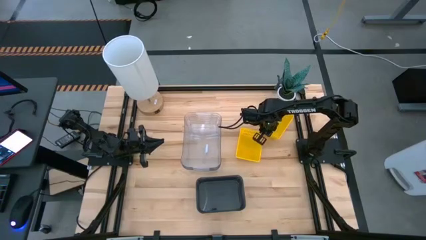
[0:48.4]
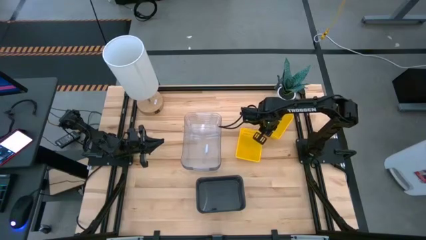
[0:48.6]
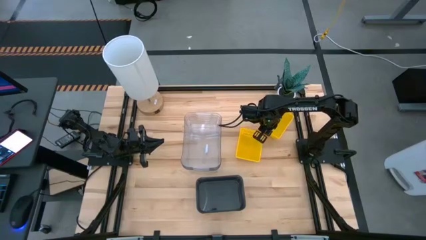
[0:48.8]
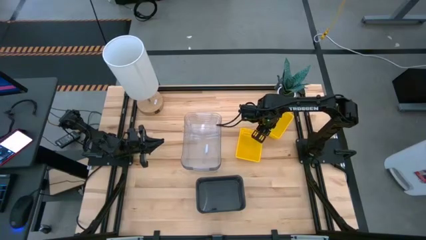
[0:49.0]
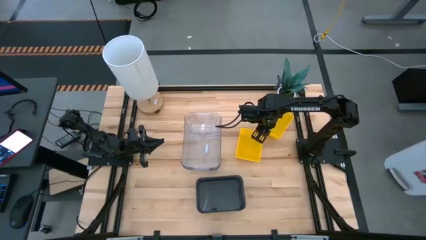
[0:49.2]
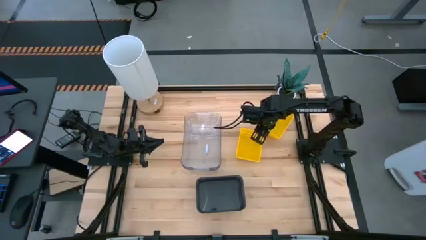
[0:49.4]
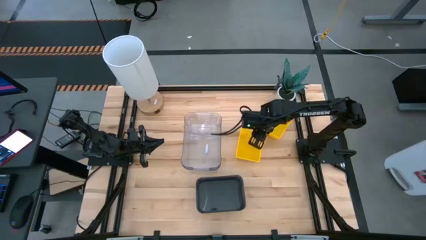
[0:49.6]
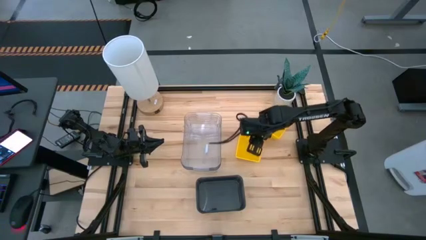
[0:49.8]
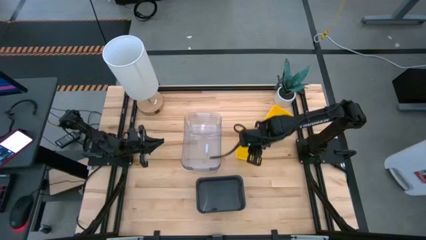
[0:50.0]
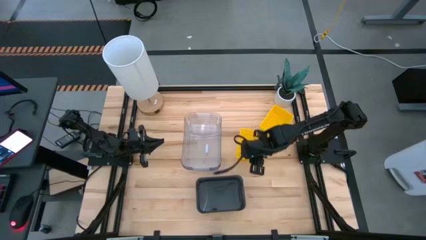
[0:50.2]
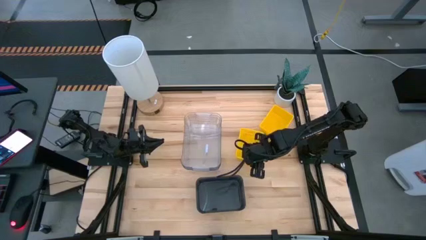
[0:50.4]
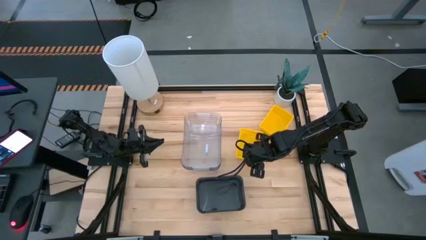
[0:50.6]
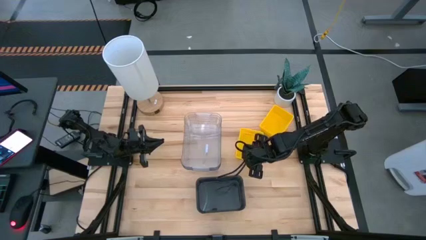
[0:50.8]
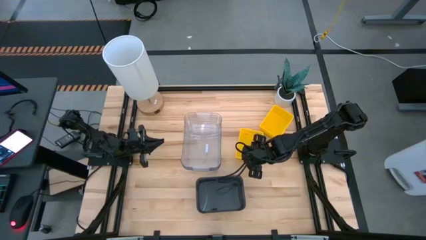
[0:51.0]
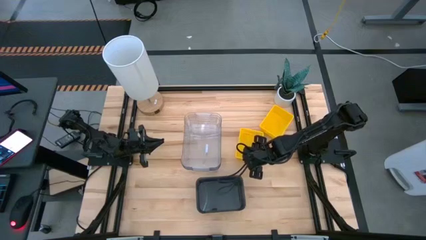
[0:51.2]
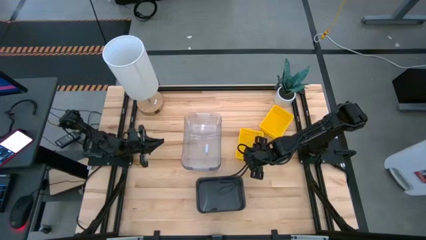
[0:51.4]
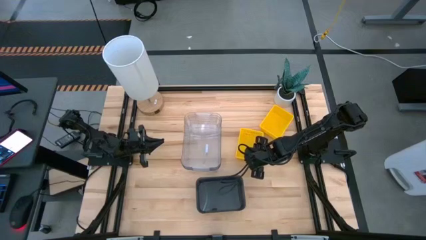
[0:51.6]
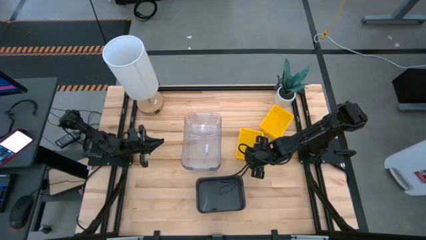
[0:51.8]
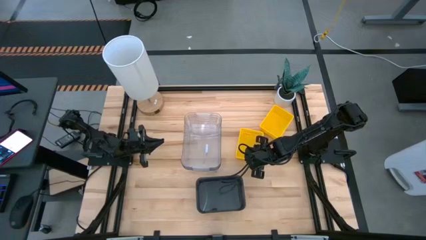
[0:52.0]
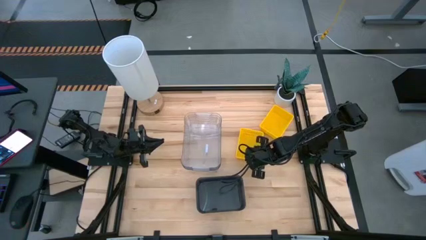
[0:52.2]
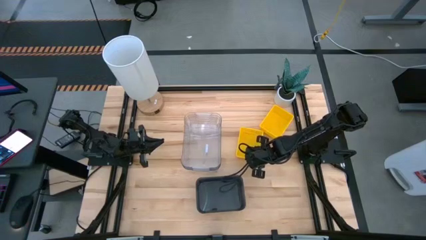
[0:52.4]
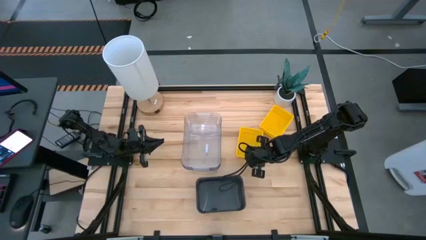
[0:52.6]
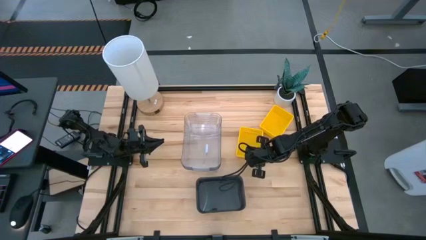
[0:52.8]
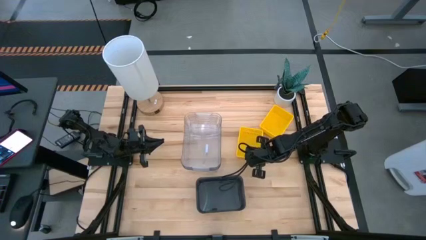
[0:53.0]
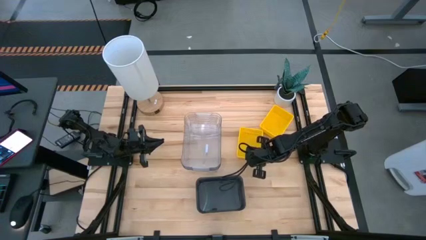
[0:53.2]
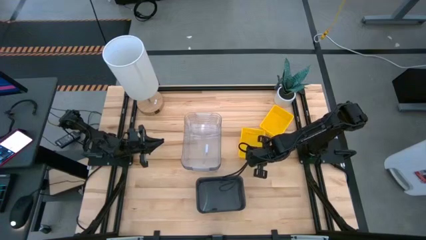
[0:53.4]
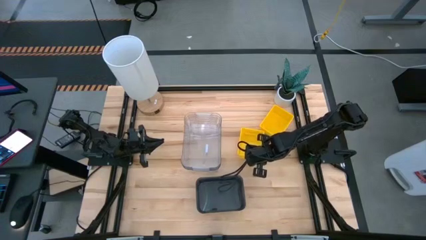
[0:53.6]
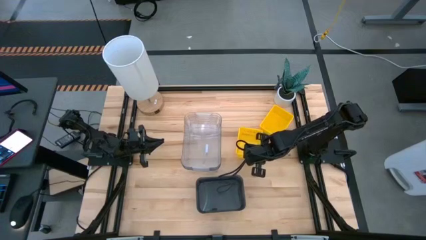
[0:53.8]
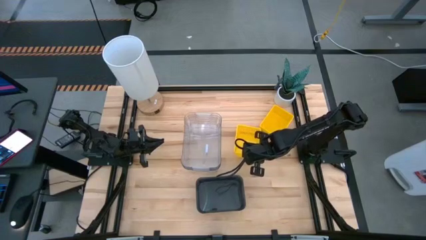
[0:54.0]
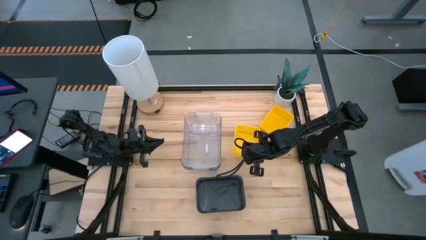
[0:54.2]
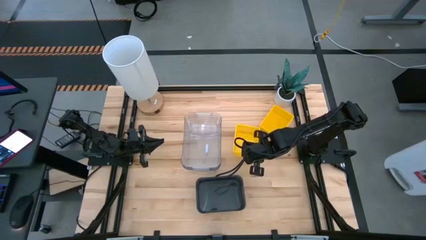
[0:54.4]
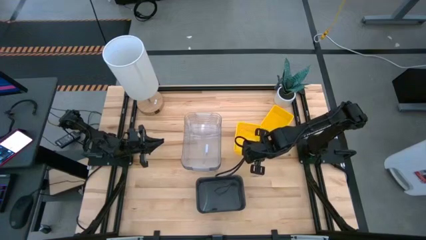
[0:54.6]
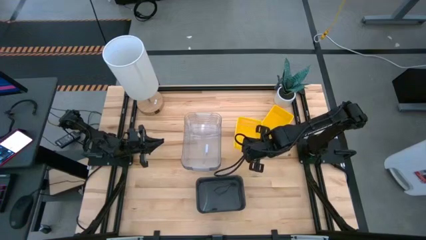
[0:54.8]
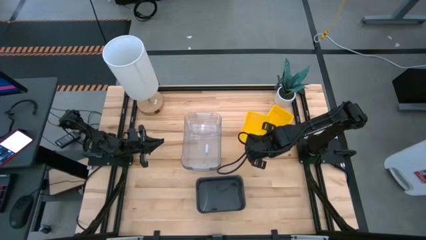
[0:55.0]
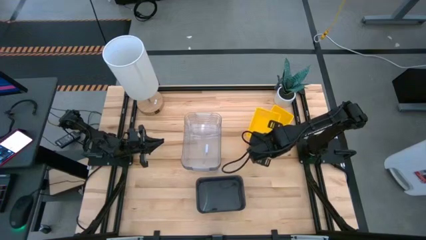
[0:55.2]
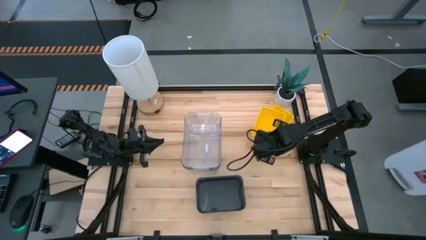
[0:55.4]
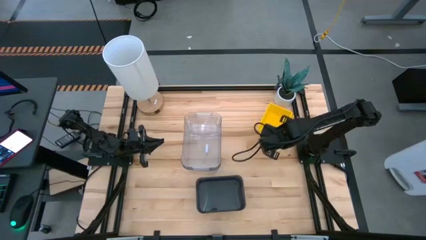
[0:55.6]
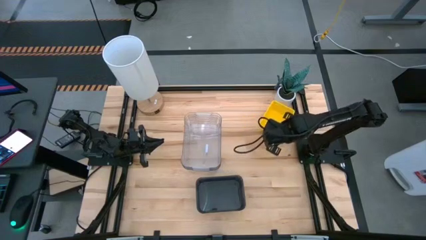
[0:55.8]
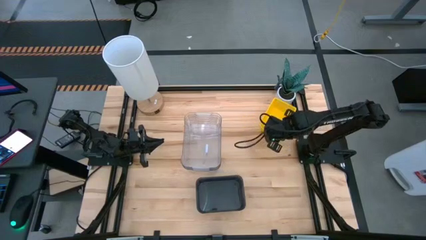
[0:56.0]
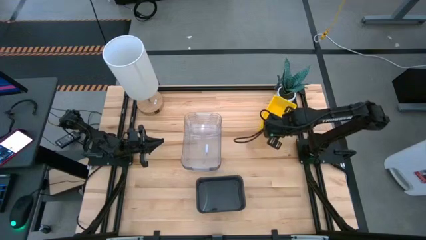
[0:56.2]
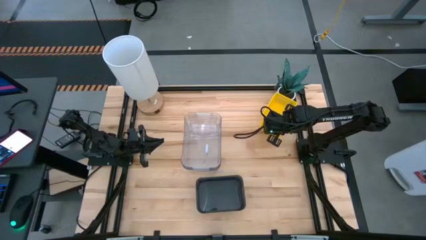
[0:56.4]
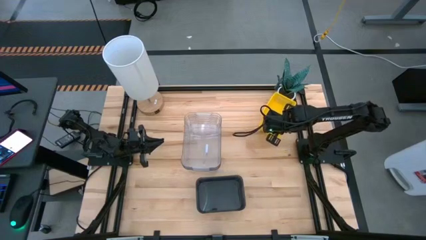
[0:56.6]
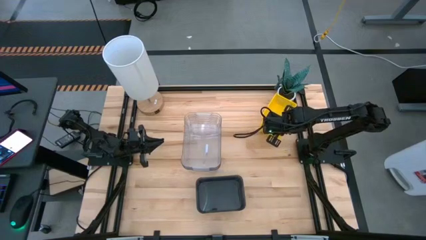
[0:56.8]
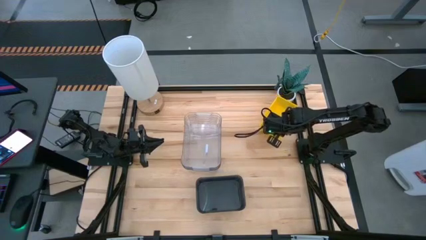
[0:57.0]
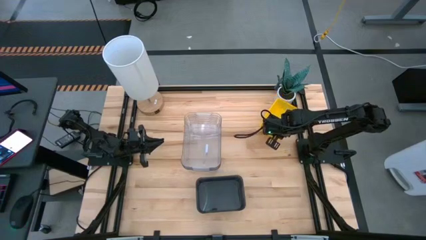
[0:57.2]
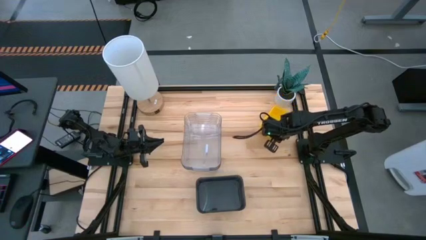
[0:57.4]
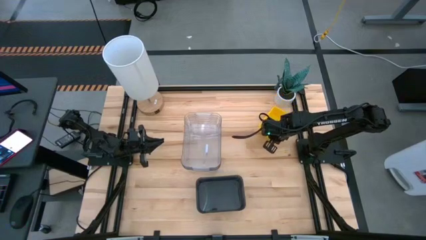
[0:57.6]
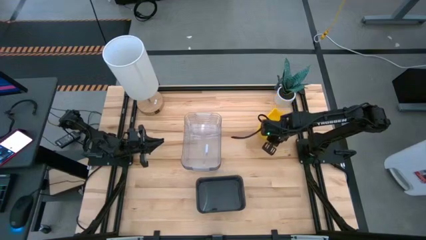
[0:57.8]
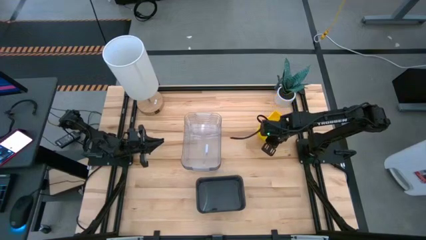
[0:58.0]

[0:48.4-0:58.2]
Stack the left yellow bin on the right stacked yellow bins

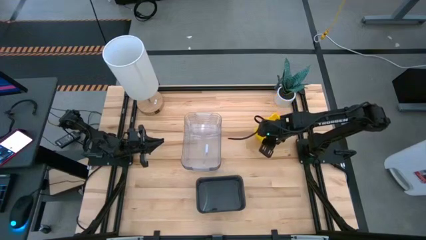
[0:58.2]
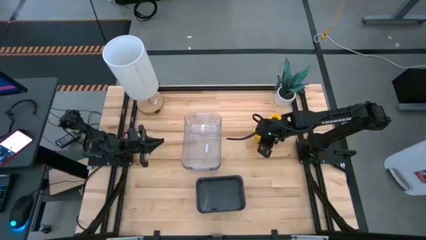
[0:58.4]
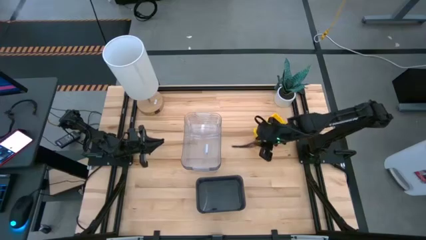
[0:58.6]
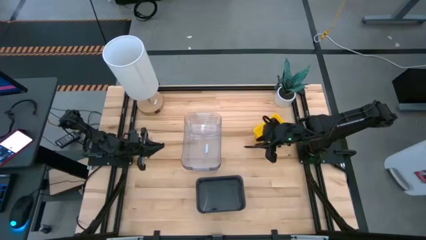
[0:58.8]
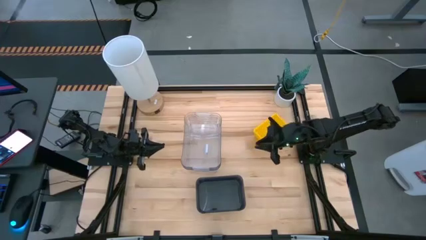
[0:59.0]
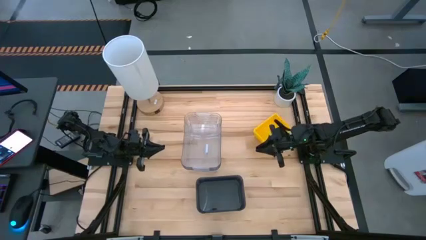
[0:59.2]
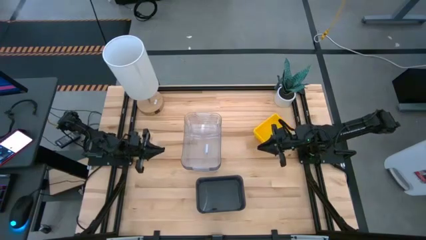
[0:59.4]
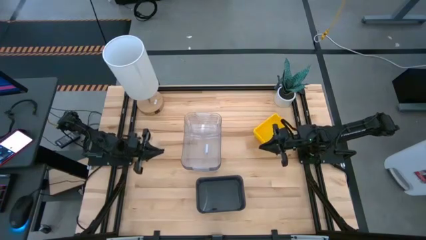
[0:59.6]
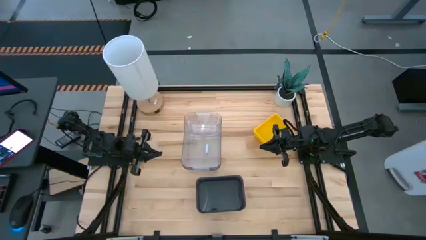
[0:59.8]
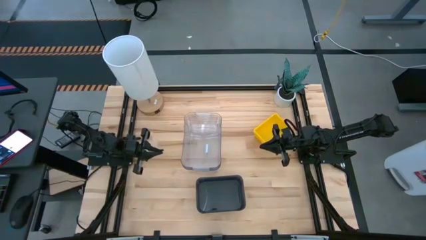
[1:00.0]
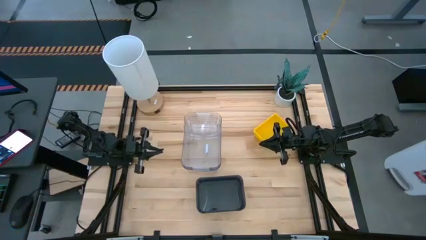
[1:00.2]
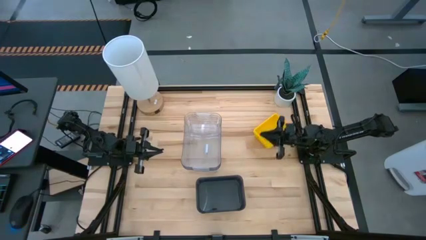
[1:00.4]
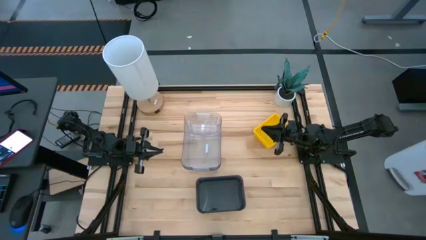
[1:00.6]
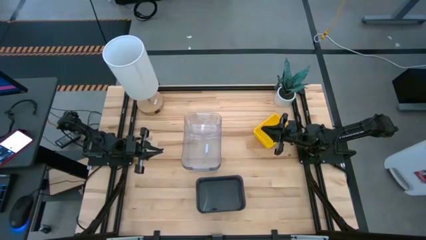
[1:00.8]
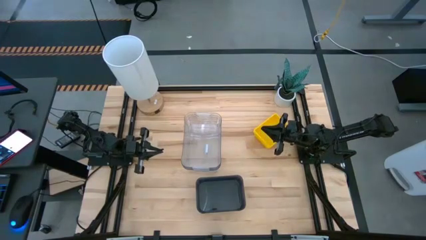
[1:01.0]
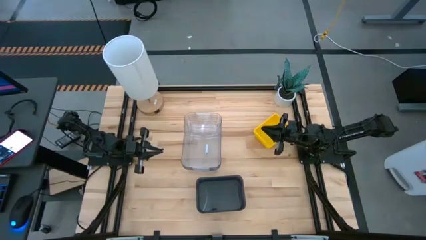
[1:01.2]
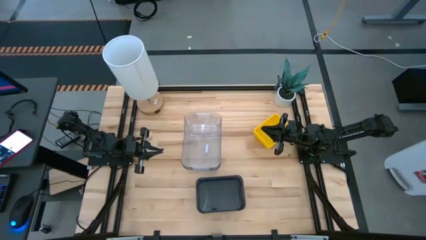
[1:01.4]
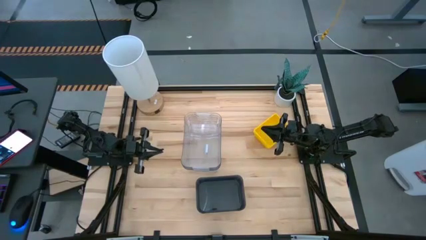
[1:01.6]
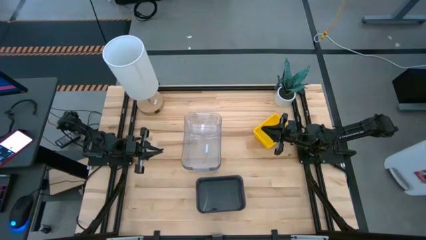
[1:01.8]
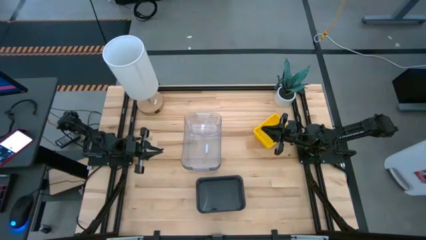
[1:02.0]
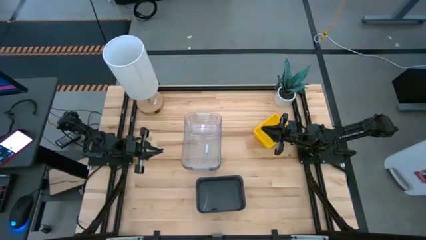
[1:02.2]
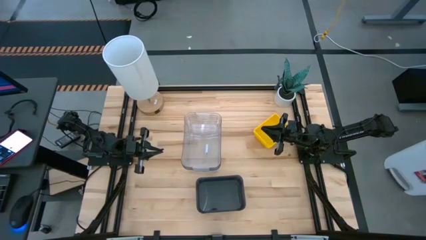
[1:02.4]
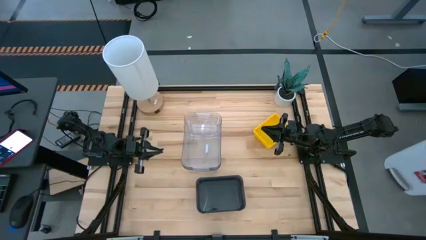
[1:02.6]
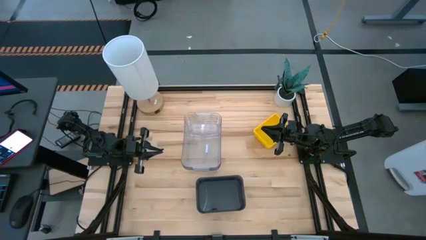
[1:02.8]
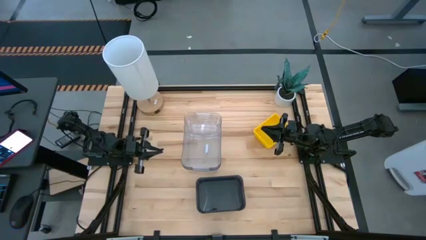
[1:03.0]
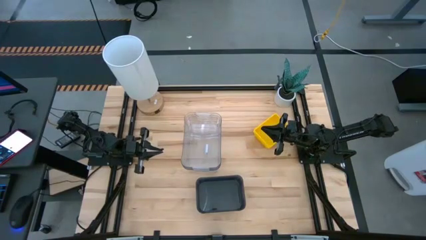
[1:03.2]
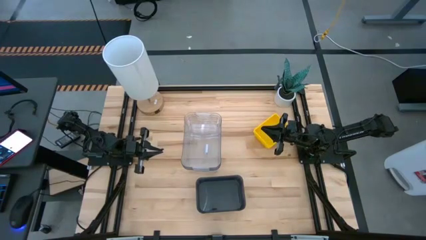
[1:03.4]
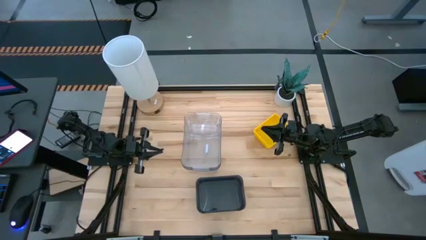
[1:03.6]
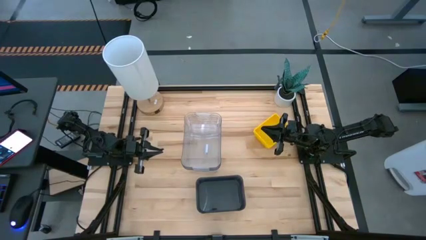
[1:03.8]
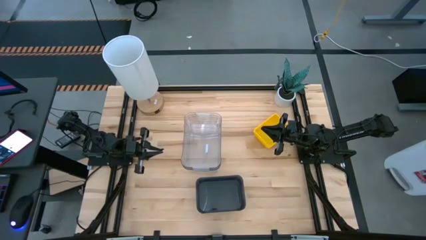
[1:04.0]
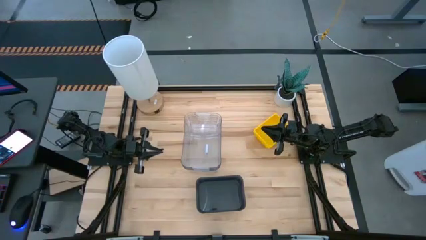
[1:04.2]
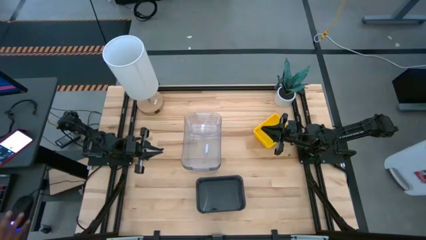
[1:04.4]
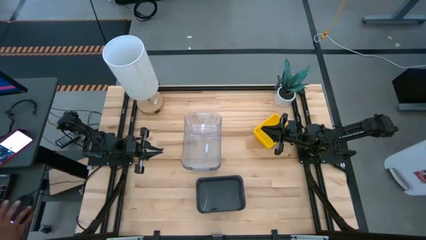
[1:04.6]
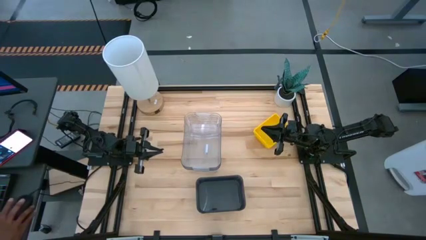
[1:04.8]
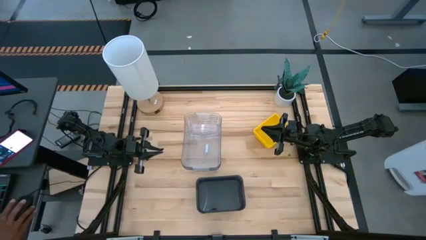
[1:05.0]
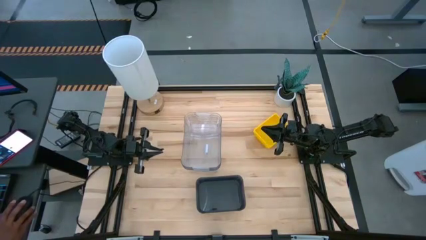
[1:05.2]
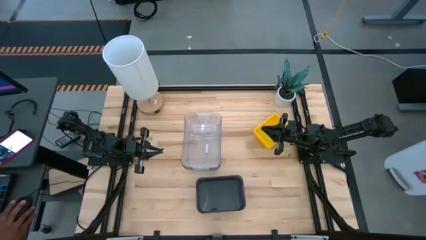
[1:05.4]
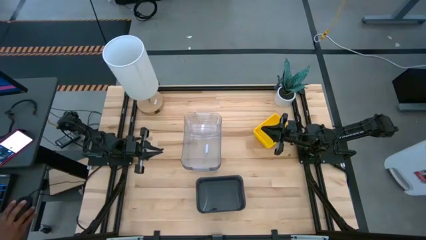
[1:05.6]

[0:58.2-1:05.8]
Return to Home Position
